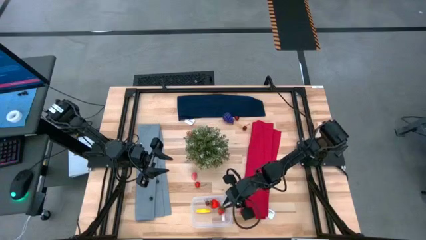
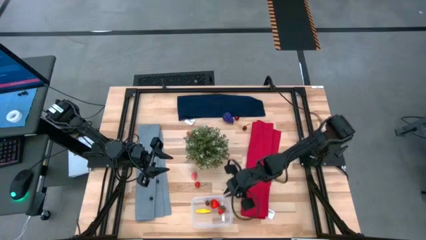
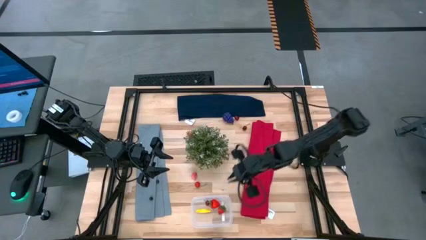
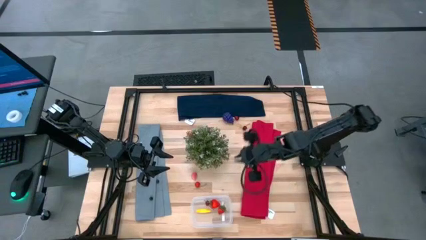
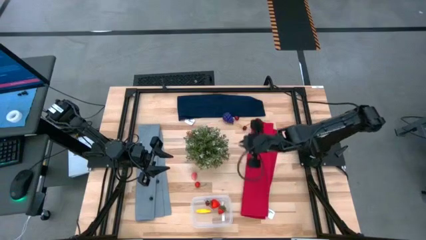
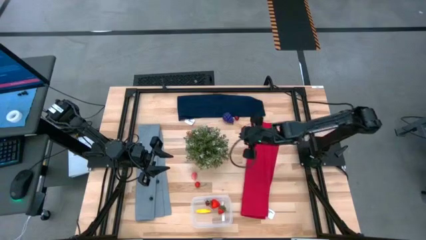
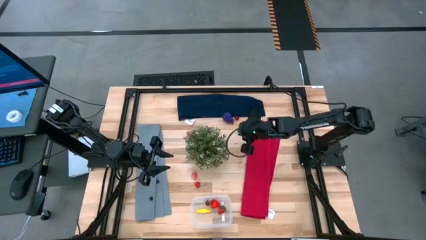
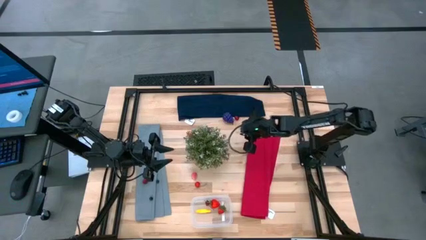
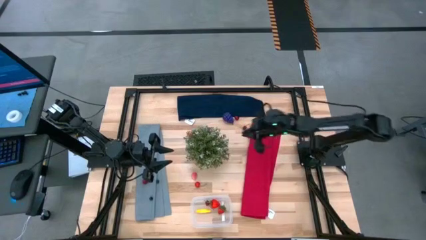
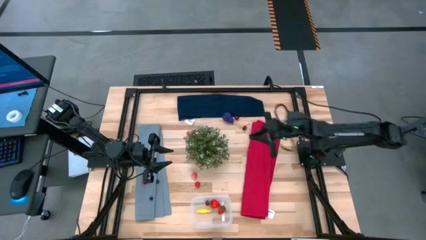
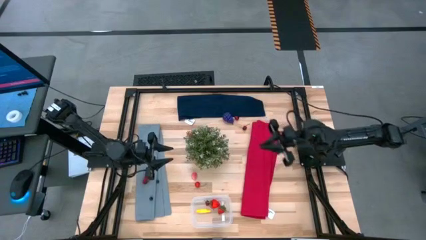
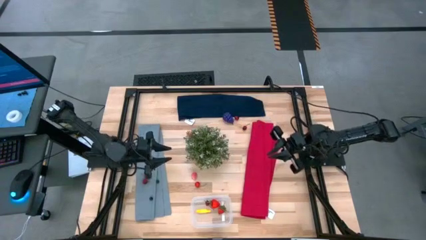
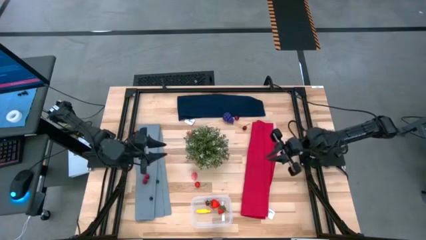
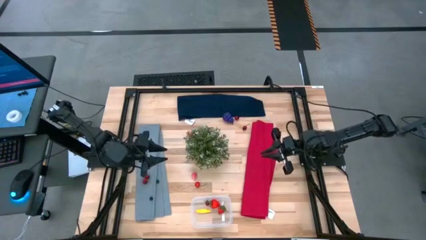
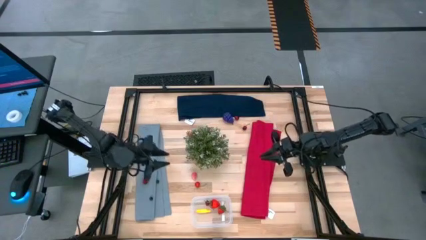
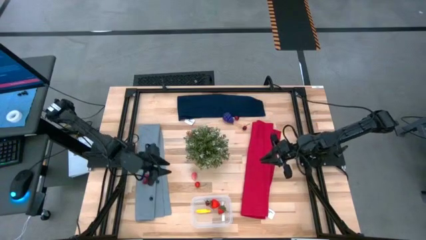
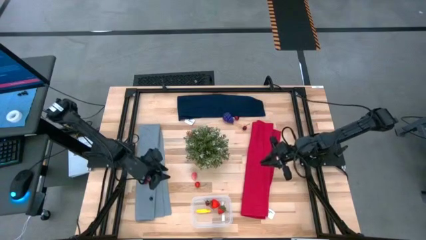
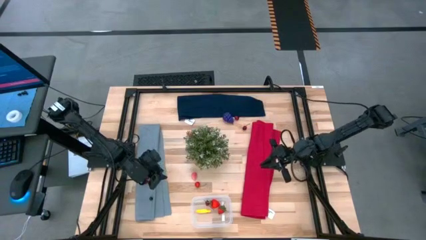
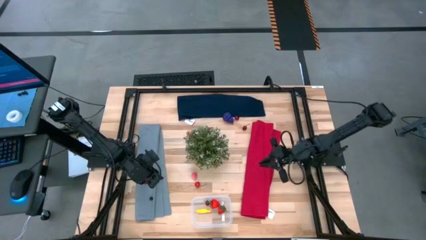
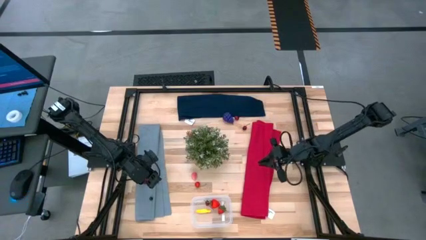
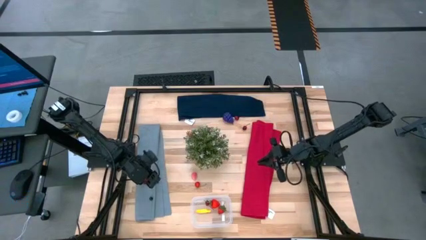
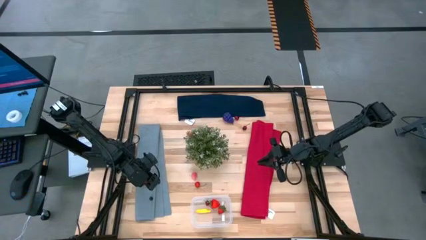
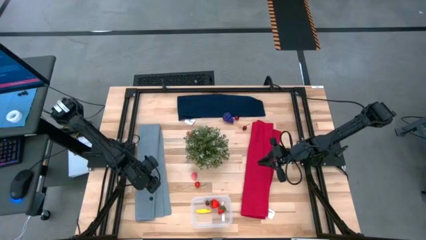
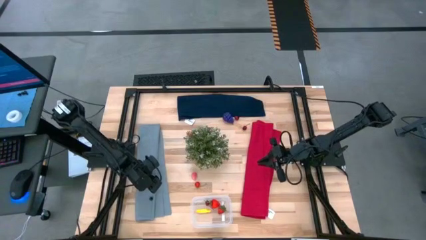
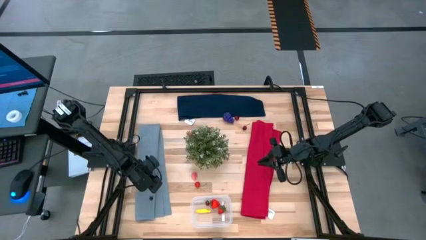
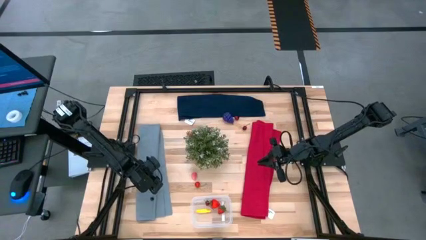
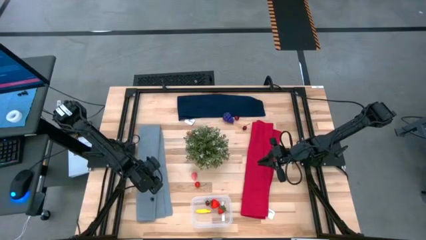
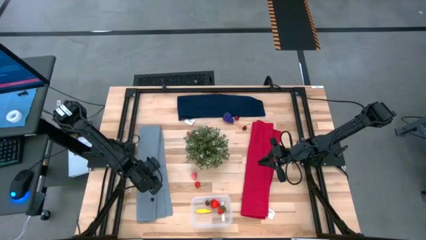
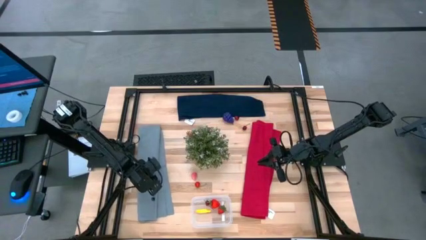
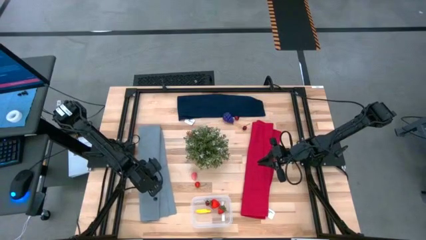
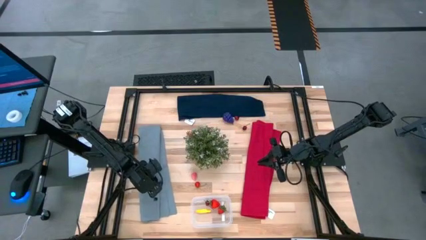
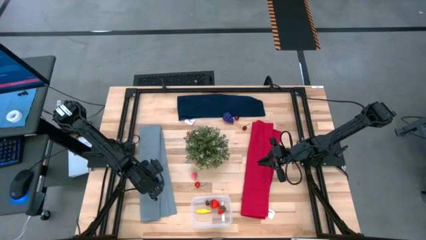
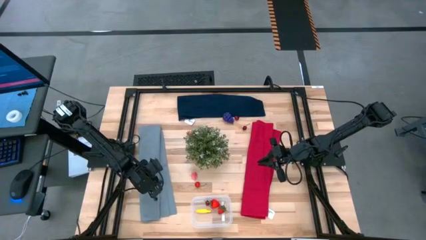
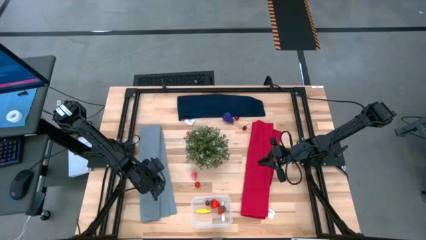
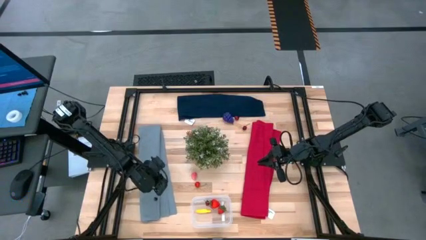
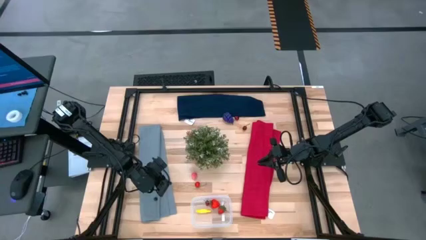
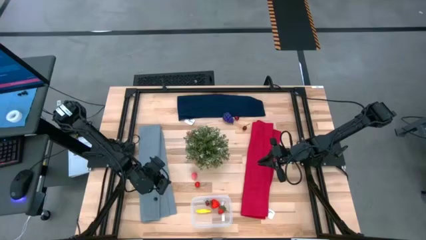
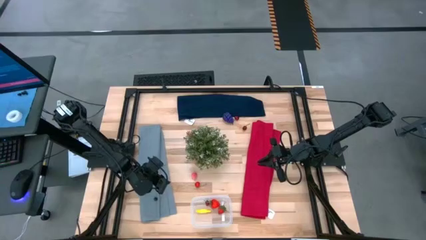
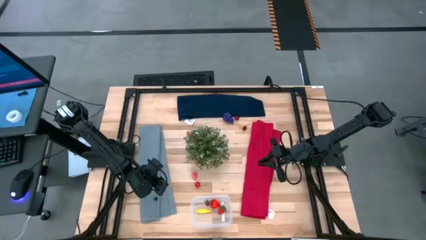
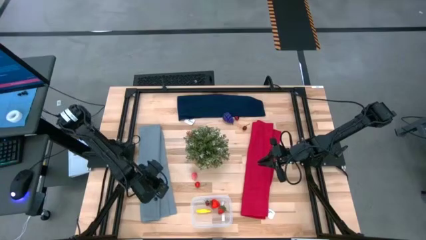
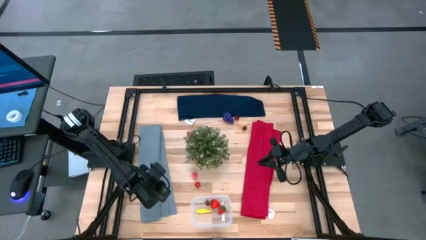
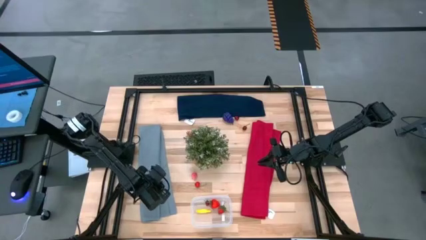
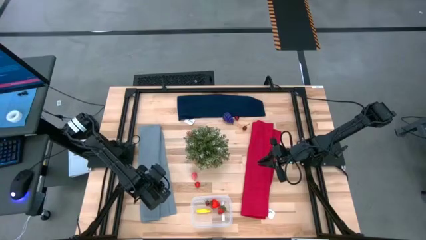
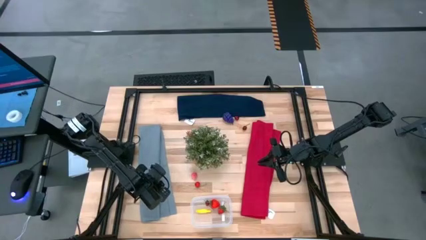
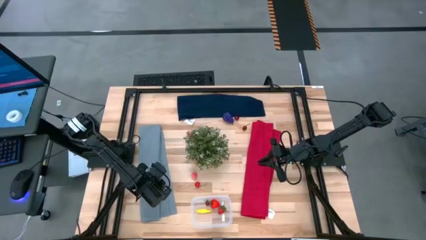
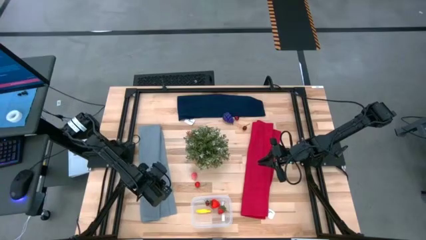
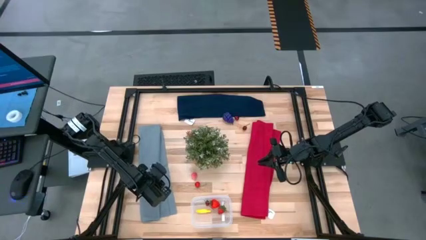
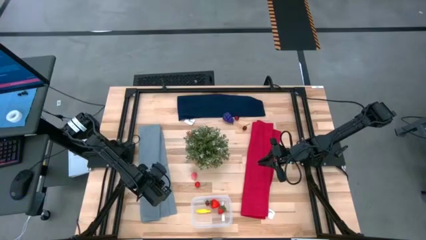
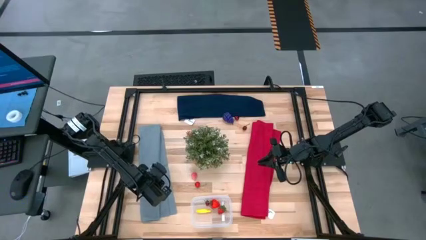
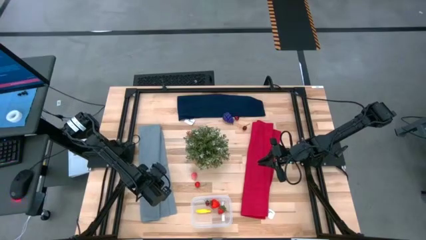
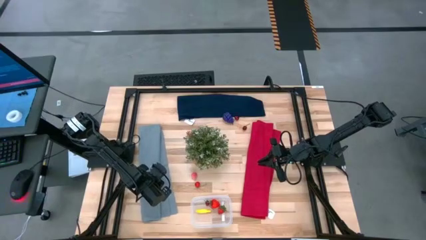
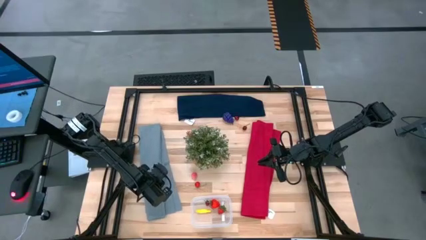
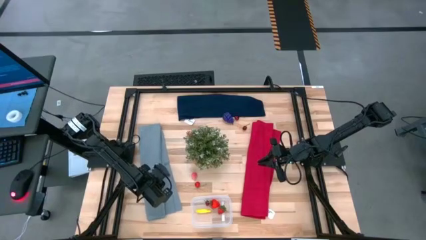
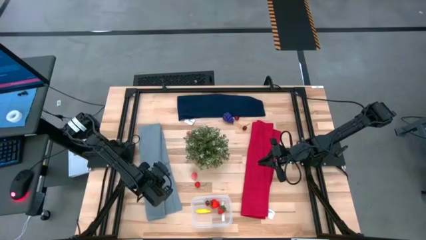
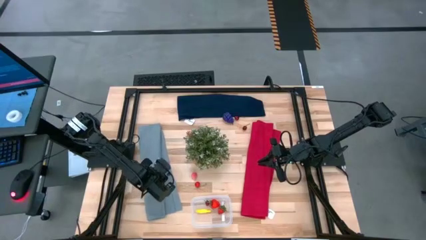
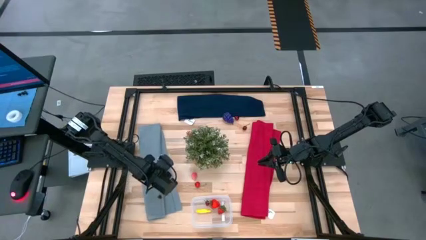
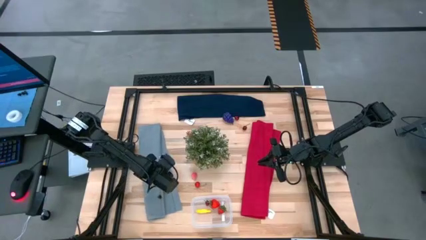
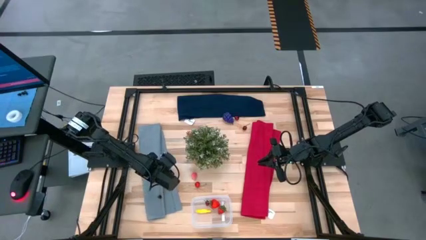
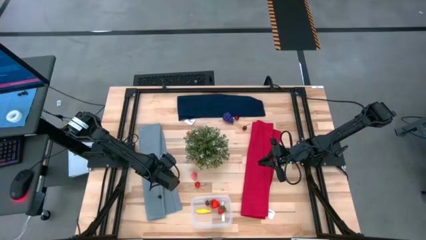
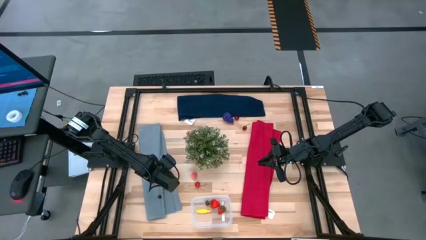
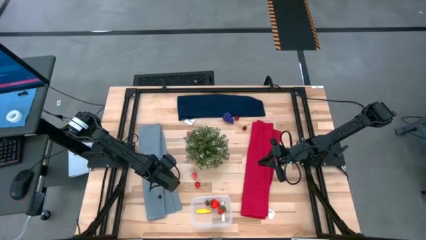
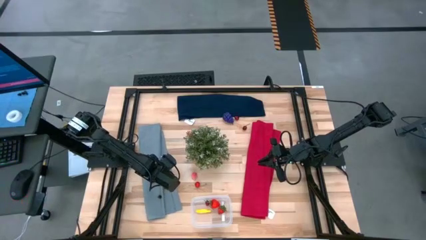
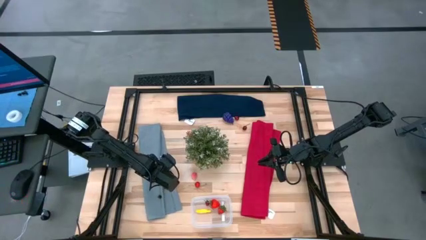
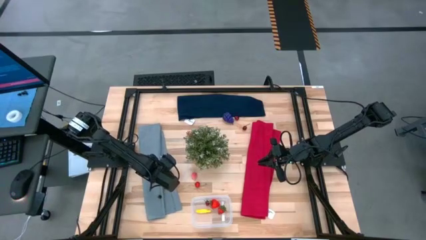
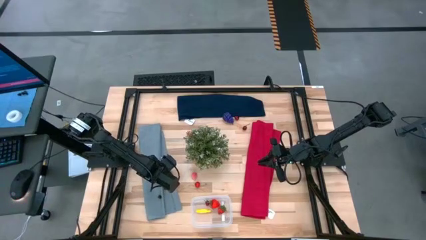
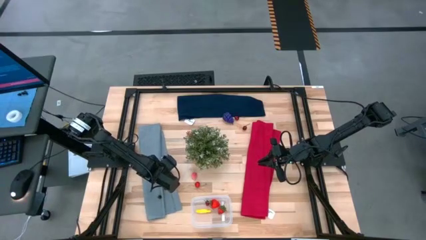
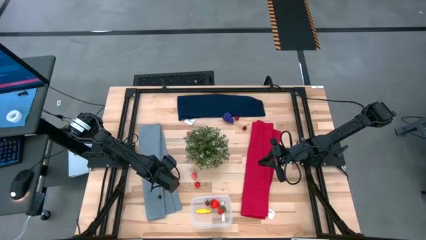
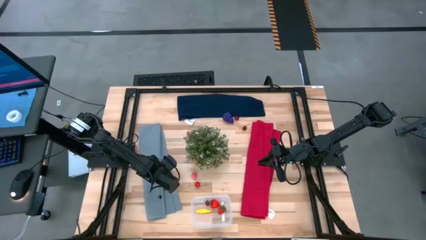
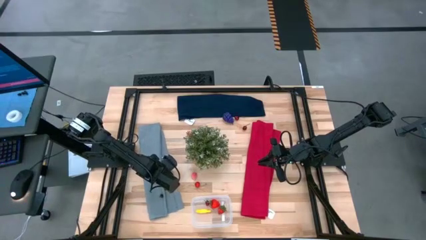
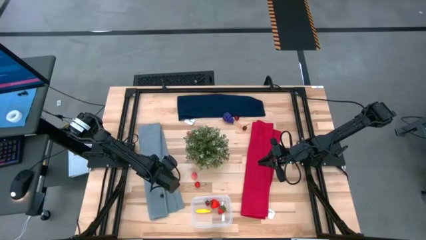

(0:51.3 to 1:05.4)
Task: Pick and placing Produce into tupperware
Put the top blueberry into the transparent container

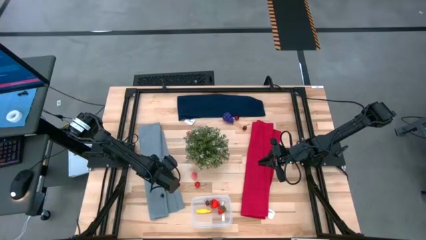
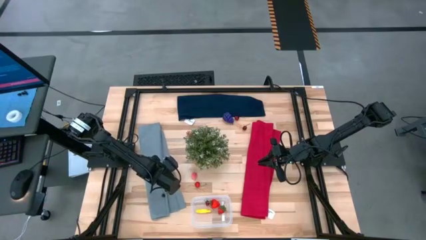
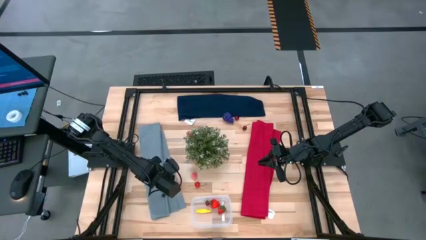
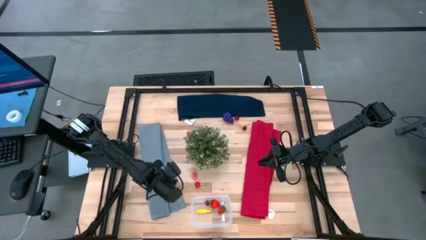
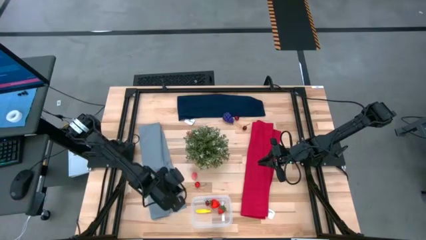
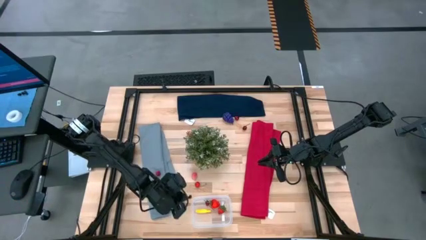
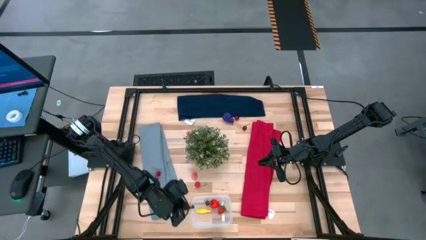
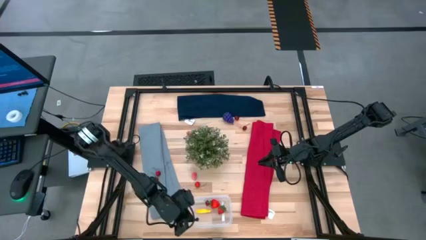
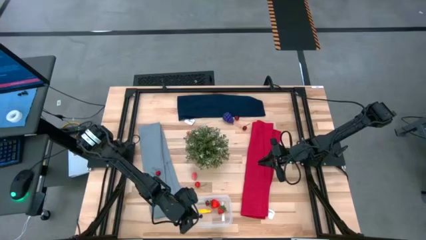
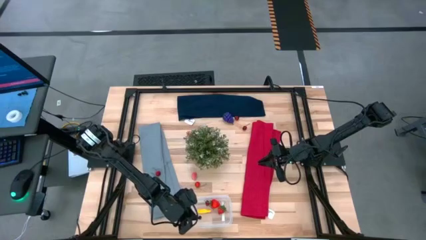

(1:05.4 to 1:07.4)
Put the top blueberry into the transparent container
